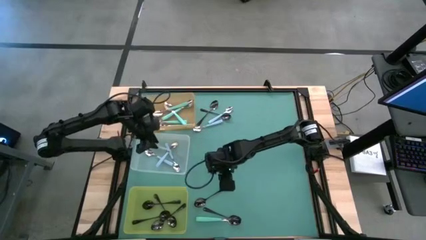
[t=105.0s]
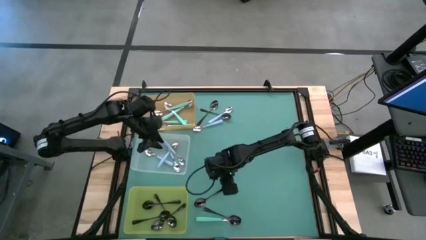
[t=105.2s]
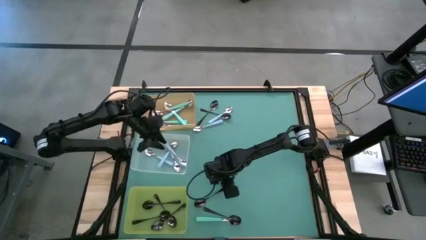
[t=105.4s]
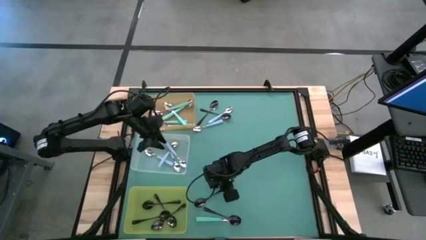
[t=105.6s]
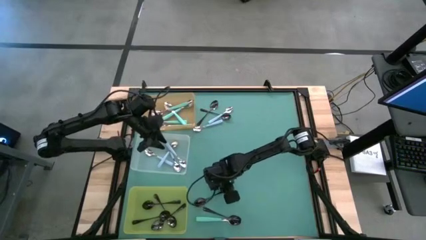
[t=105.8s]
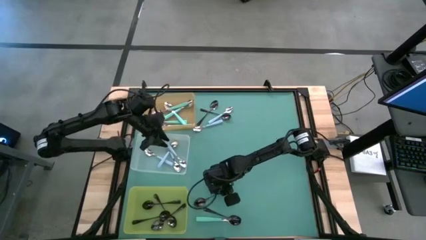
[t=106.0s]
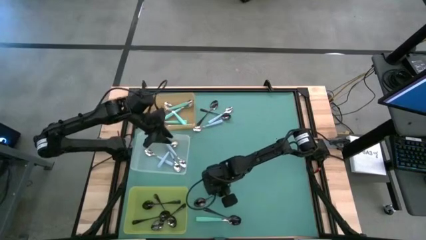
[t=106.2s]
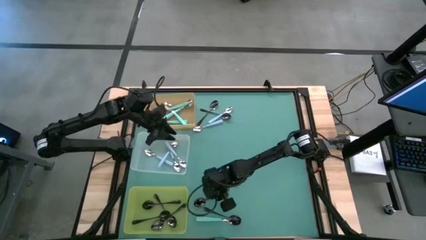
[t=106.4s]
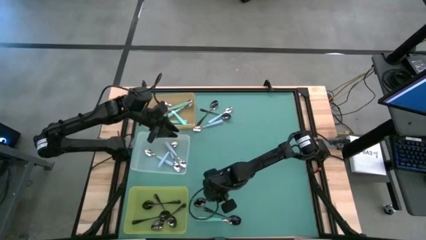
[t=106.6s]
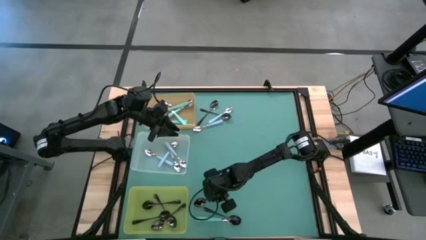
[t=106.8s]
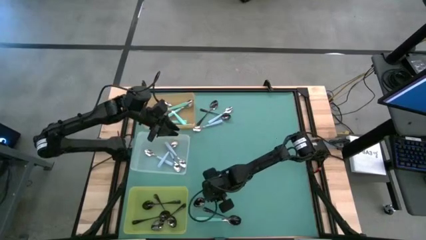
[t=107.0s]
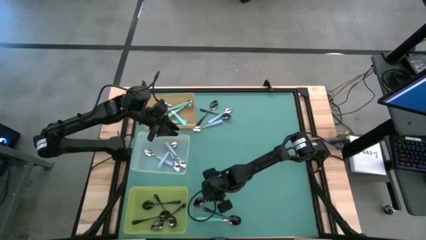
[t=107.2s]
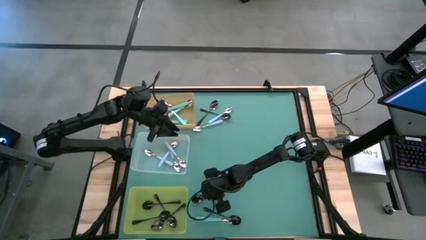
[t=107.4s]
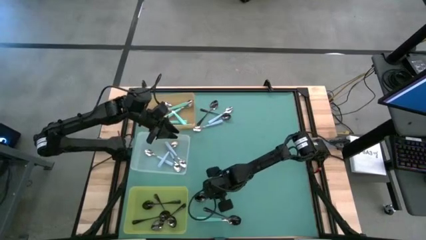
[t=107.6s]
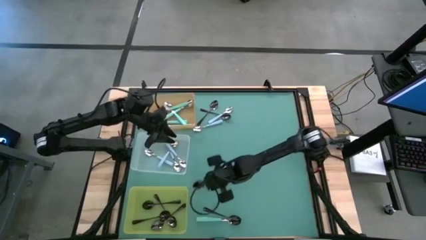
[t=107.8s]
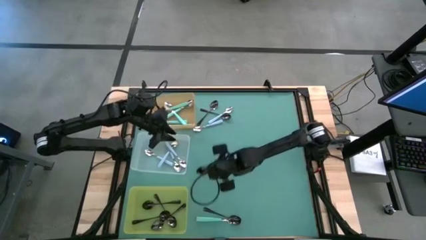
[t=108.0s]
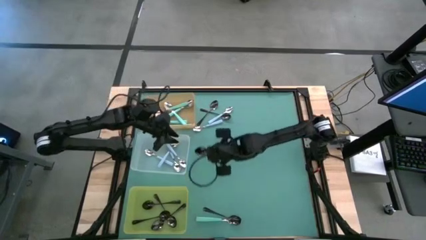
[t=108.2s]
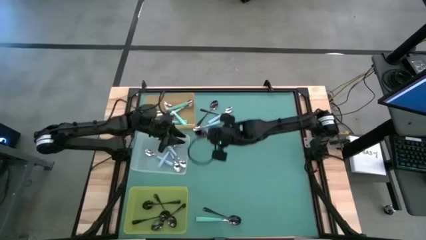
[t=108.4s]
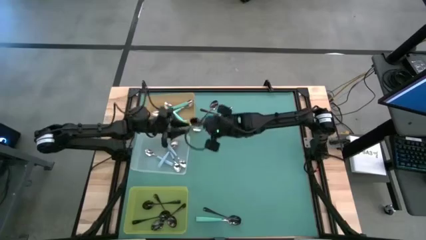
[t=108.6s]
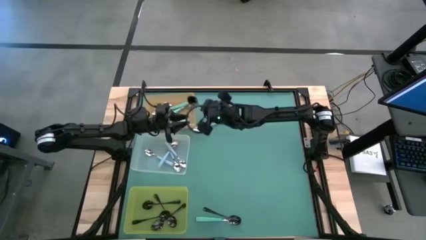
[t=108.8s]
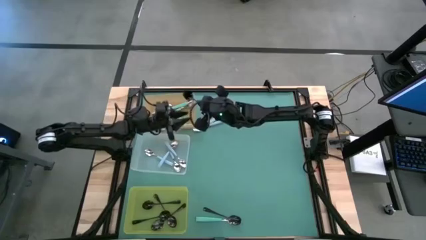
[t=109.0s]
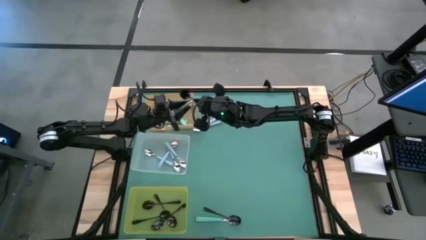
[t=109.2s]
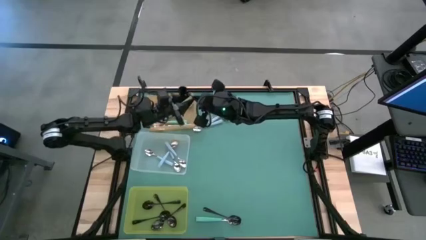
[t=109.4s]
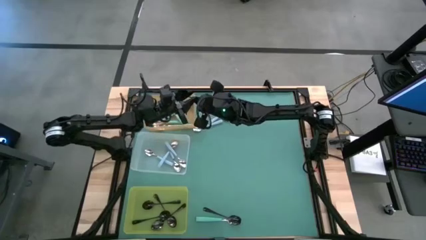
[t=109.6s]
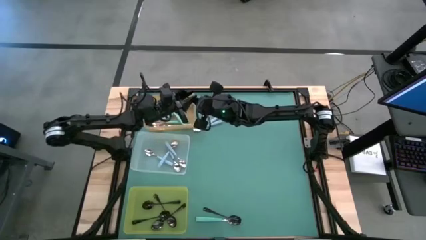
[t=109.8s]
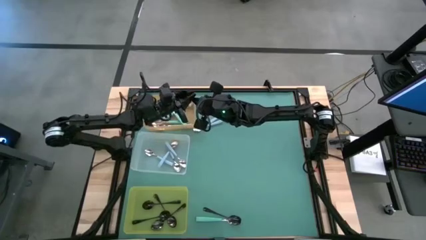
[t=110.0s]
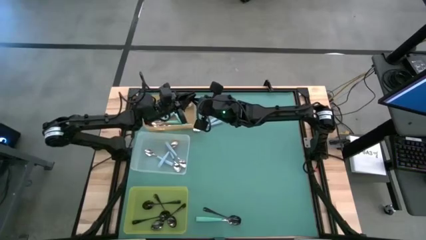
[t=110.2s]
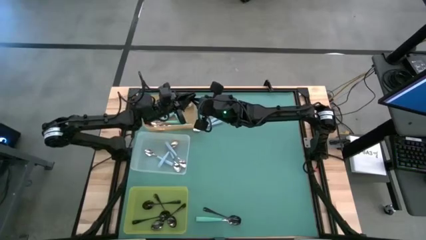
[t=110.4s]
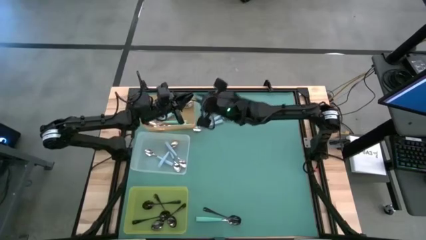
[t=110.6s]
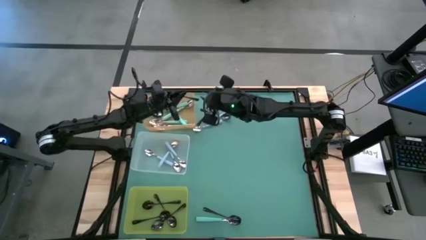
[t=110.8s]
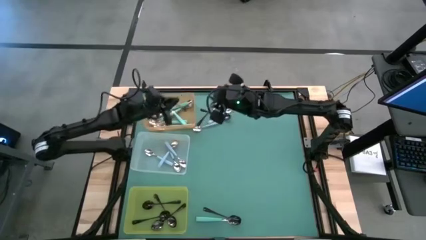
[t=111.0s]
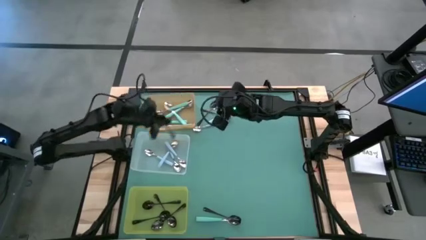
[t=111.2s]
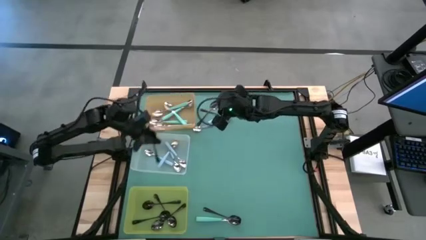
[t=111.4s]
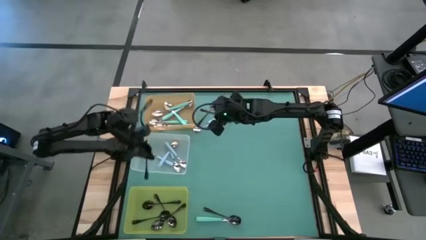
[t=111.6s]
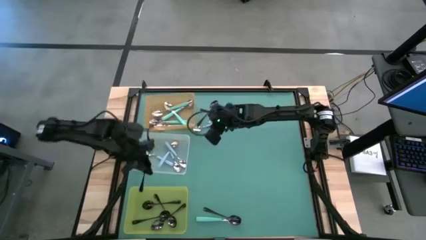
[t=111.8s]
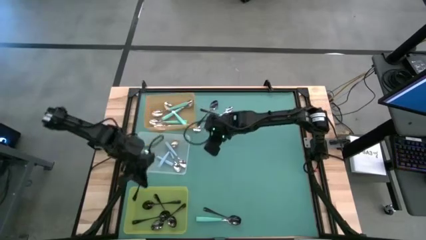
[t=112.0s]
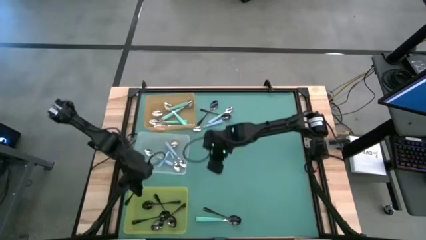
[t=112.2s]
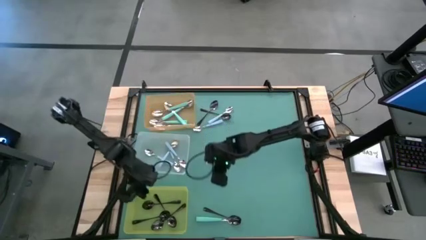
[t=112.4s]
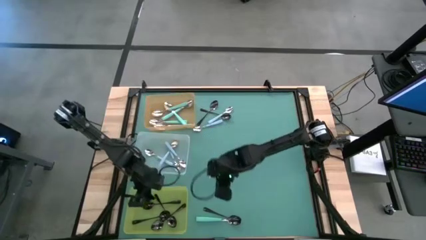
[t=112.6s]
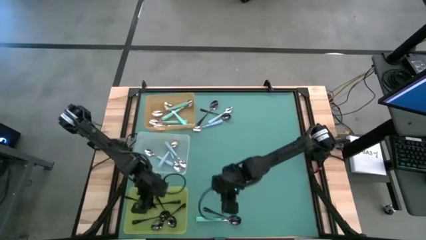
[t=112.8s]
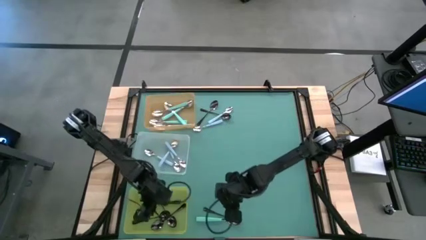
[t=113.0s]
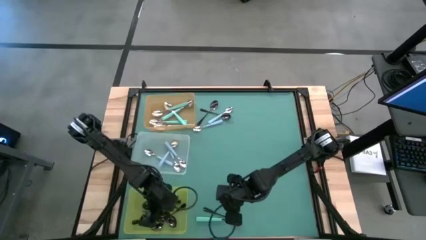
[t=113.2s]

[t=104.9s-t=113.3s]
Task: Sort silverware by color (type)
Put the black spoon into the yellow bin

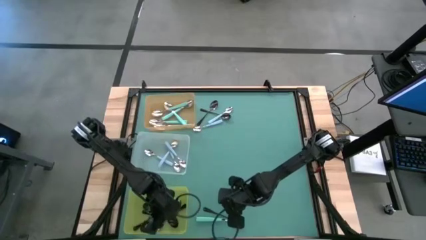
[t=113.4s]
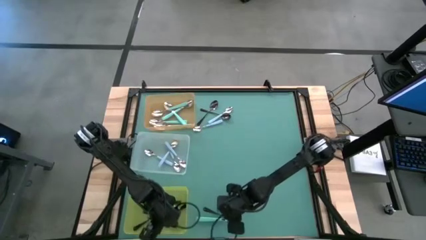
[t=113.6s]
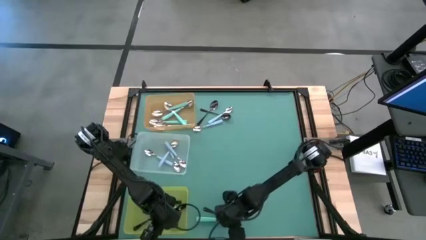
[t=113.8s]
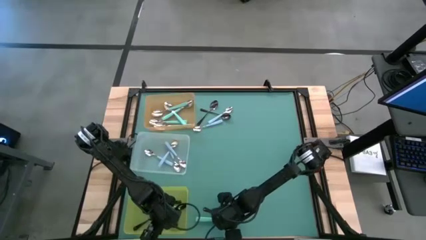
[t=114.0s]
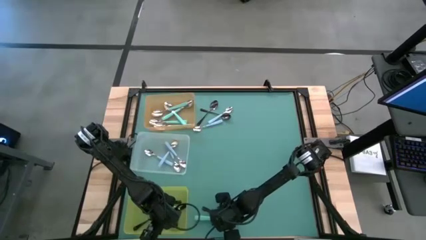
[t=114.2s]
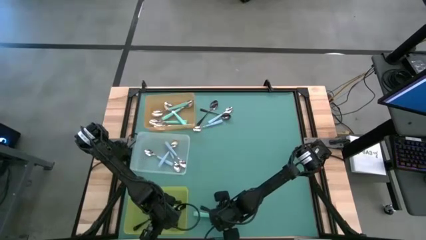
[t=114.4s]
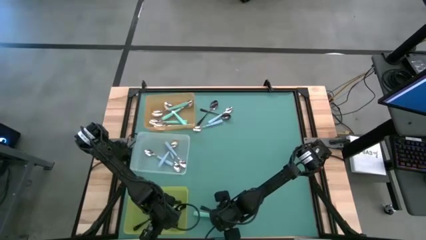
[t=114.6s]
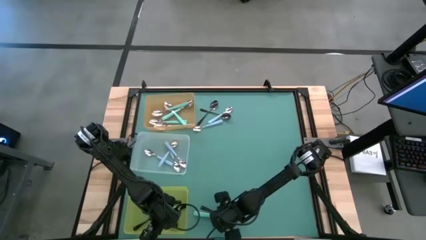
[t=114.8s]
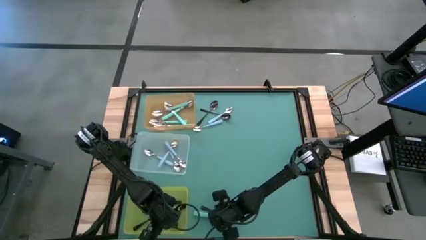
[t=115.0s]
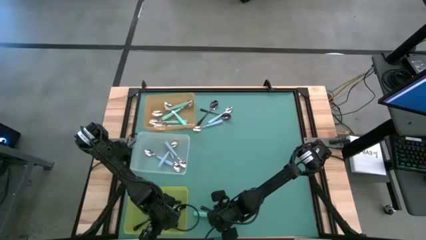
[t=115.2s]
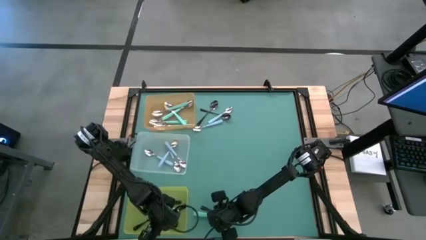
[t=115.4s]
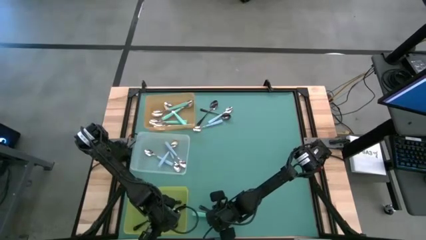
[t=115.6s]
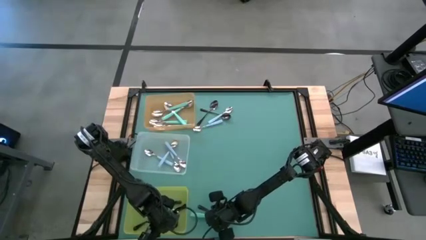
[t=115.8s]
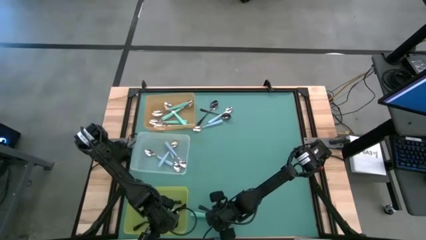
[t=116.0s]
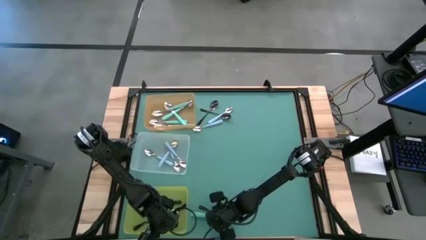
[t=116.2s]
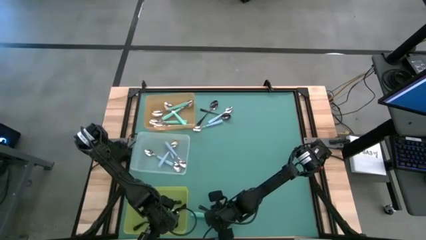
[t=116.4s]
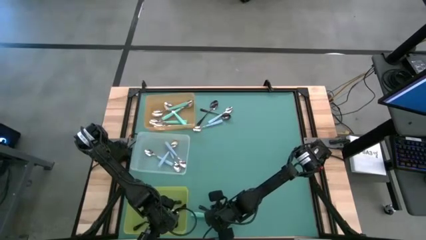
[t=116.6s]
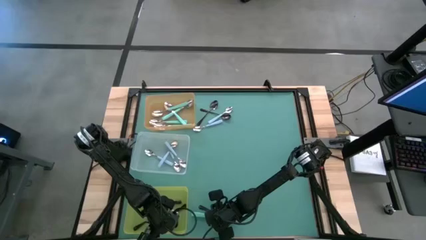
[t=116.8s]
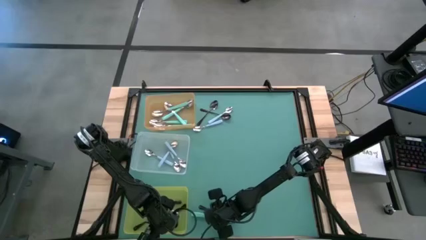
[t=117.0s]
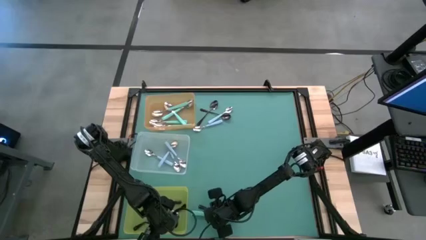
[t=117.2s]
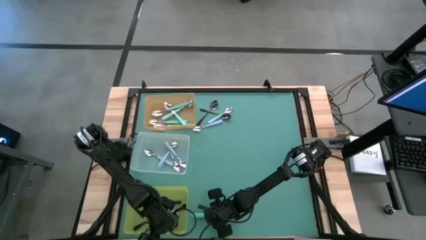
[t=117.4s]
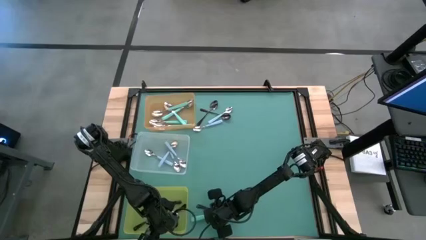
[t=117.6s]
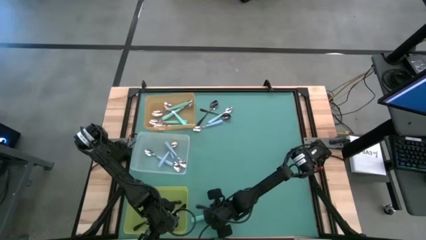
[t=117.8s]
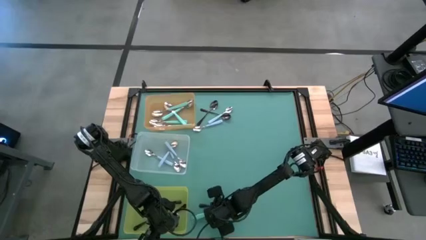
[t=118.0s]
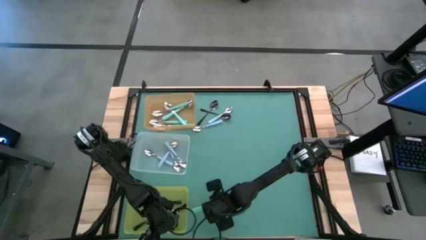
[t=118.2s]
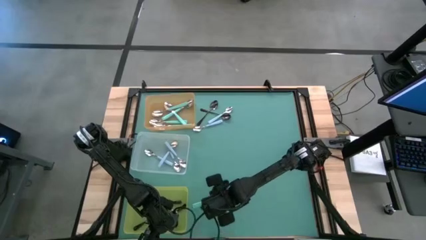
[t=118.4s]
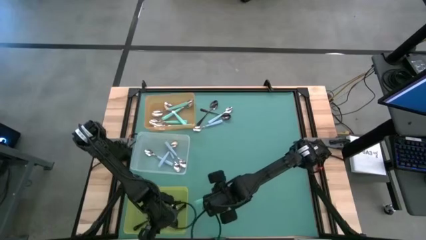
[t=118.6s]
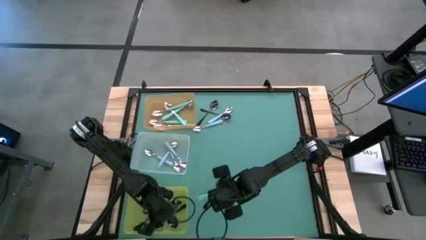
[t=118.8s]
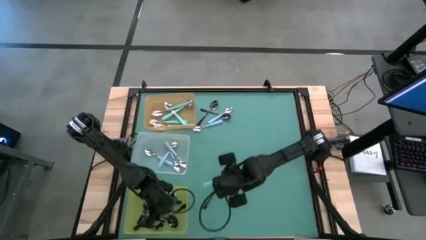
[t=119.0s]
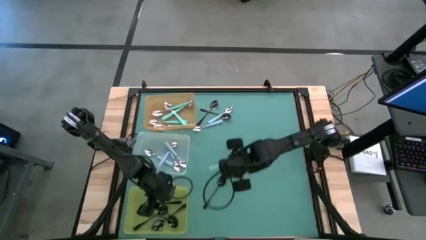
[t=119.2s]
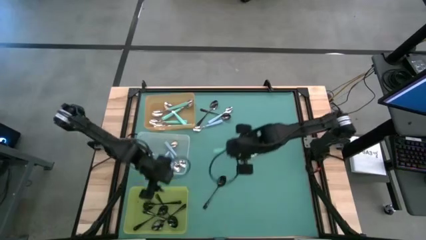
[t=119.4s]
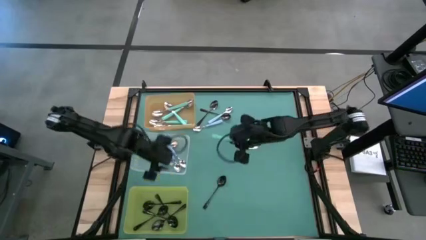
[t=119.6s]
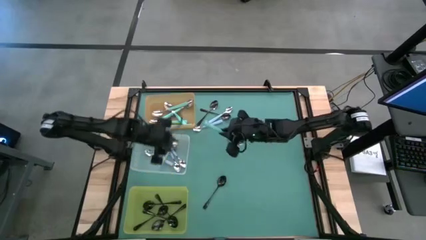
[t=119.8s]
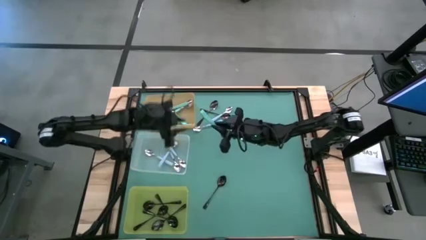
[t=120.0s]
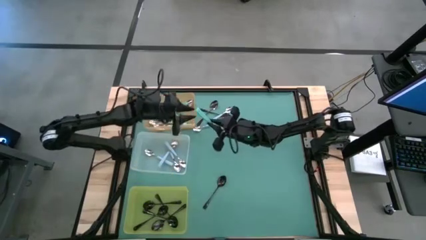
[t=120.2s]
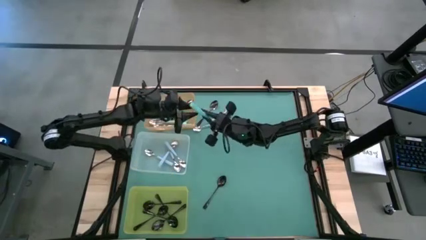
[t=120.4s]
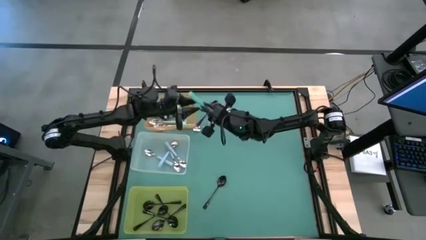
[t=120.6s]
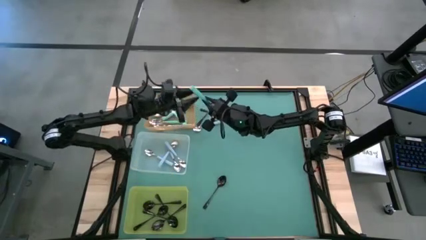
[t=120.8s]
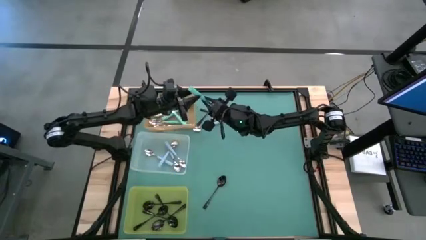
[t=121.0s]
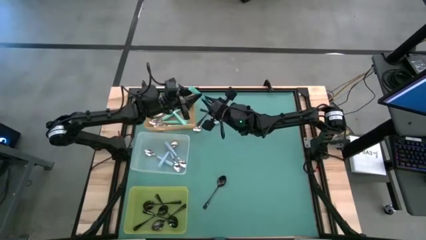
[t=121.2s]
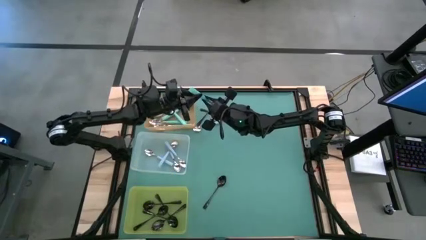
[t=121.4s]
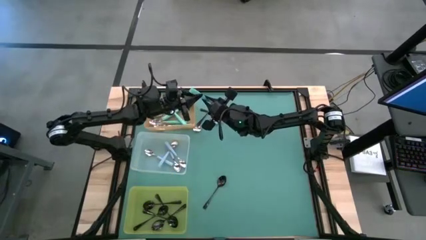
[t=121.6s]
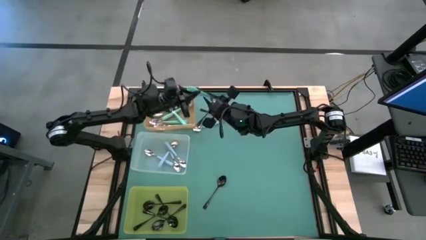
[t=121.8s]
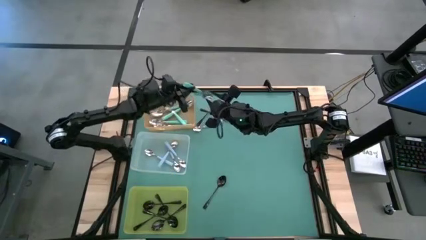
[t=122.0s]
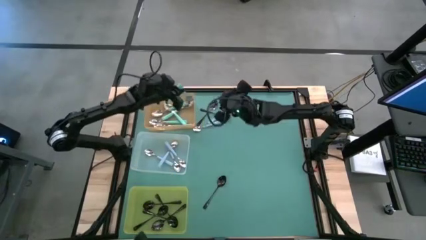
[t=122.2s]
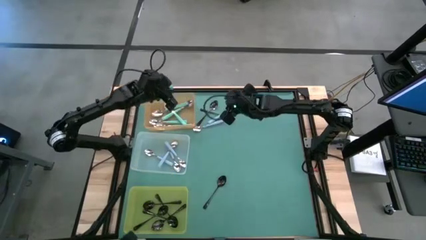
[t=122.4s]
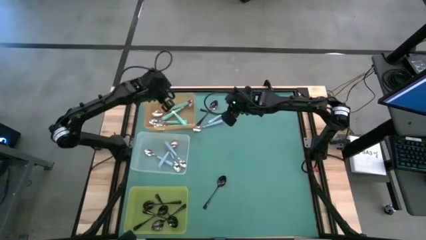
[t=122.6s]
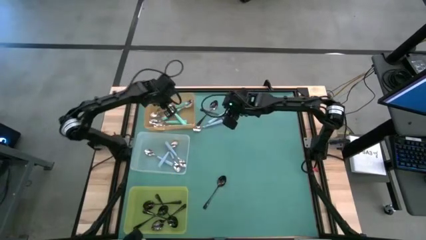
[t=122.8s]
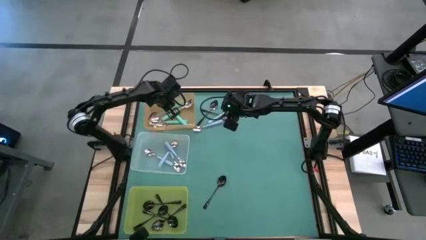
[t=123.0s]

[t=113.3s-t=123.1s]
Put the green spoon into the orange bin
